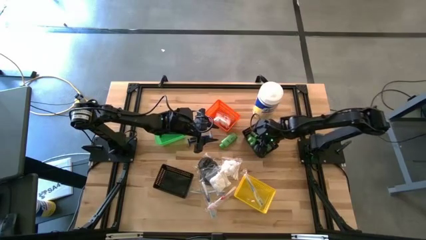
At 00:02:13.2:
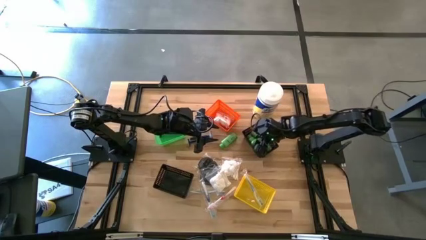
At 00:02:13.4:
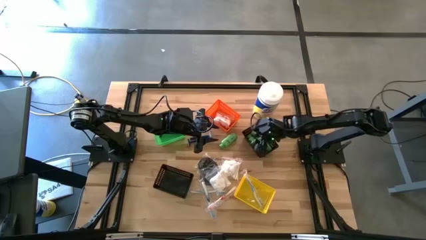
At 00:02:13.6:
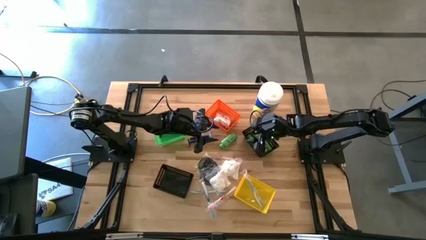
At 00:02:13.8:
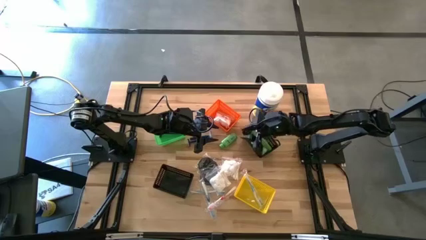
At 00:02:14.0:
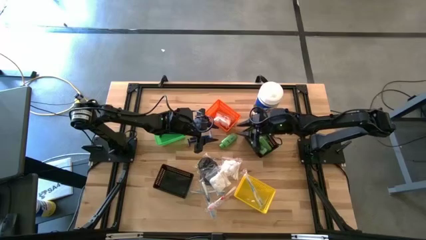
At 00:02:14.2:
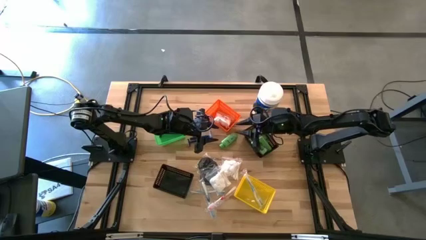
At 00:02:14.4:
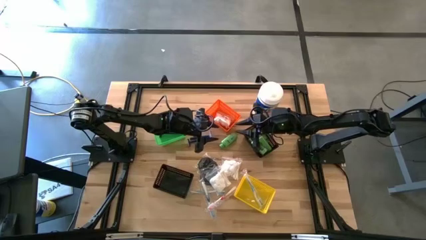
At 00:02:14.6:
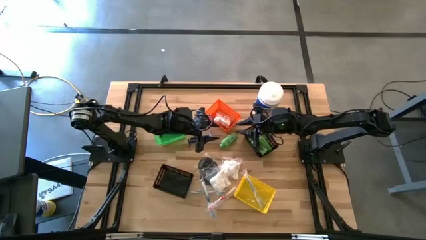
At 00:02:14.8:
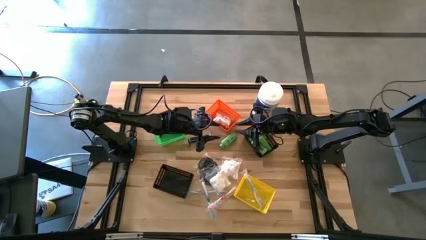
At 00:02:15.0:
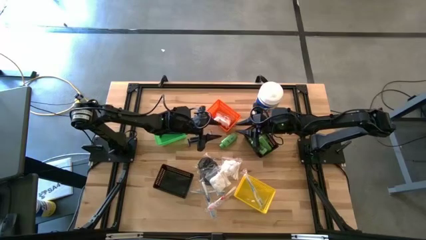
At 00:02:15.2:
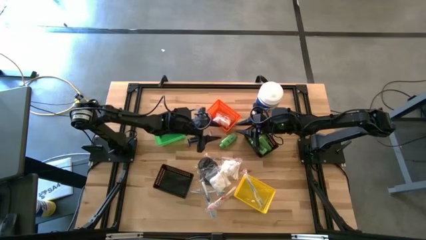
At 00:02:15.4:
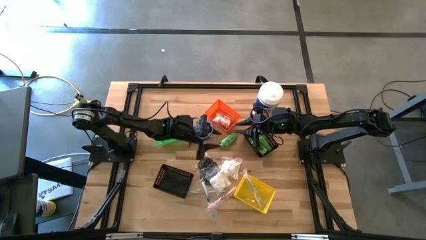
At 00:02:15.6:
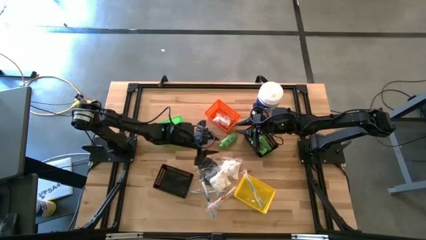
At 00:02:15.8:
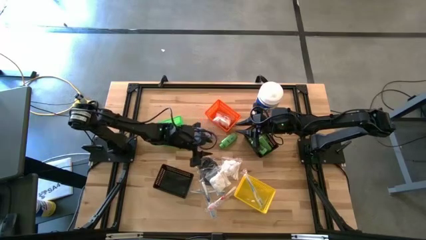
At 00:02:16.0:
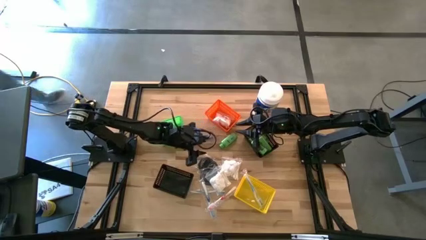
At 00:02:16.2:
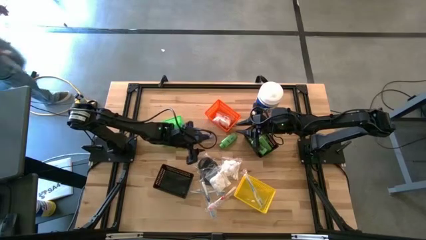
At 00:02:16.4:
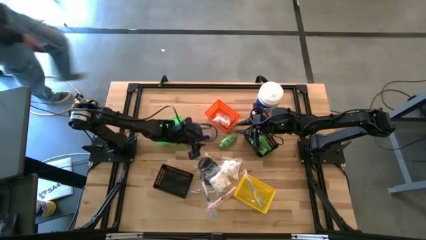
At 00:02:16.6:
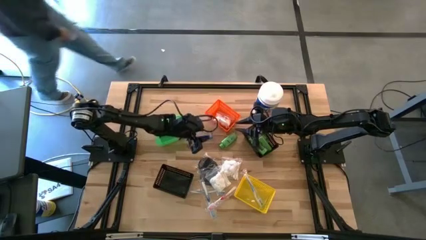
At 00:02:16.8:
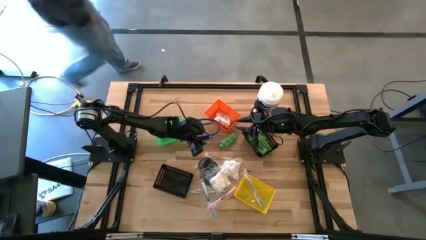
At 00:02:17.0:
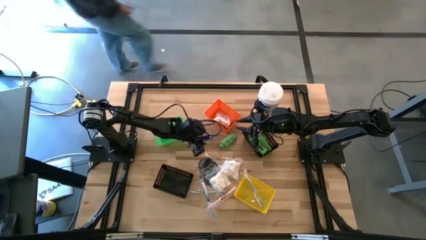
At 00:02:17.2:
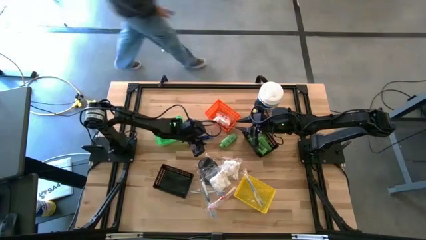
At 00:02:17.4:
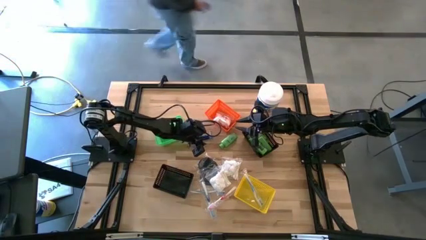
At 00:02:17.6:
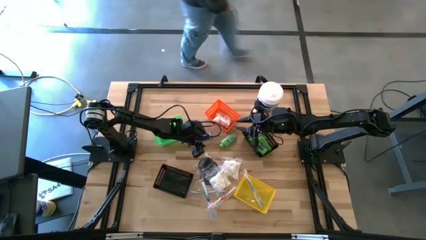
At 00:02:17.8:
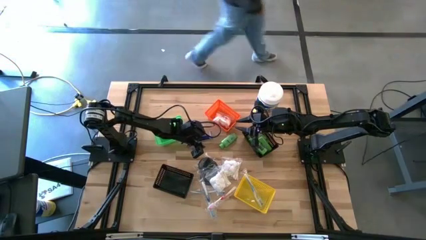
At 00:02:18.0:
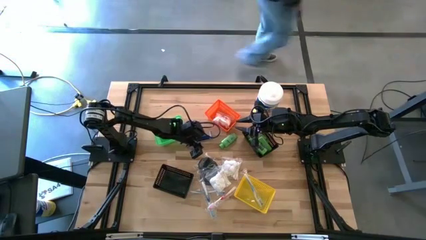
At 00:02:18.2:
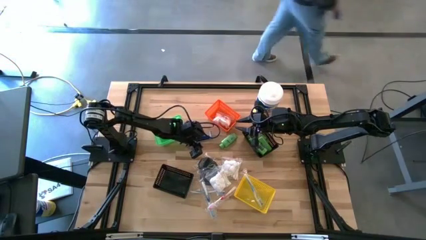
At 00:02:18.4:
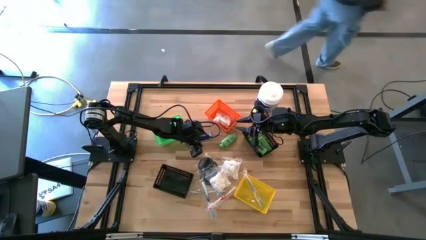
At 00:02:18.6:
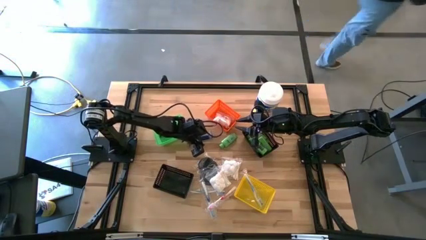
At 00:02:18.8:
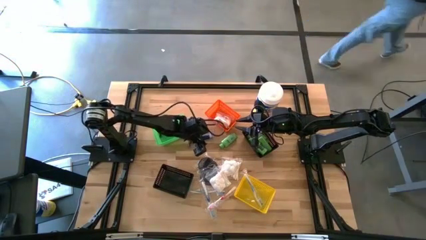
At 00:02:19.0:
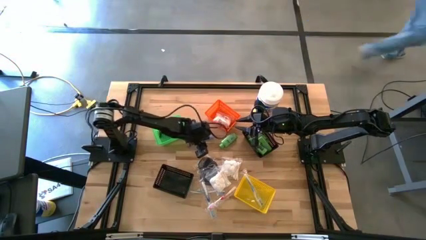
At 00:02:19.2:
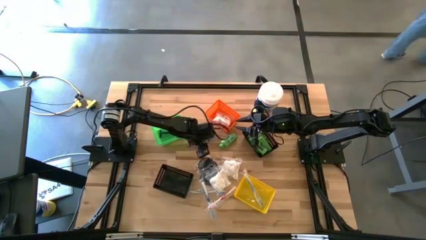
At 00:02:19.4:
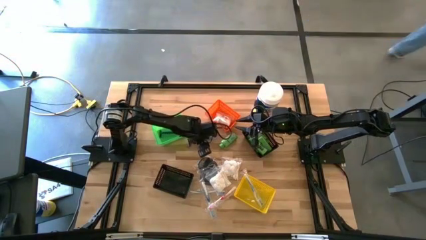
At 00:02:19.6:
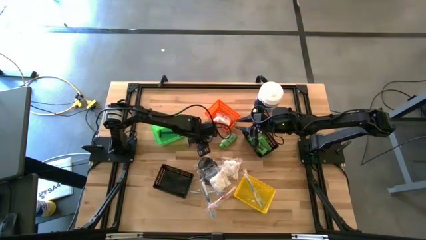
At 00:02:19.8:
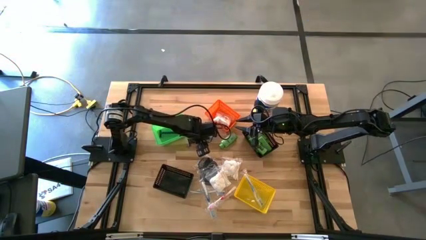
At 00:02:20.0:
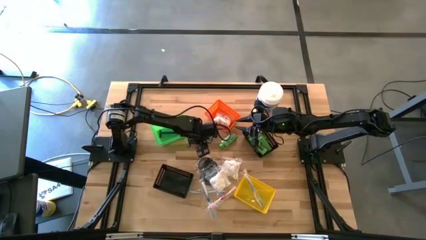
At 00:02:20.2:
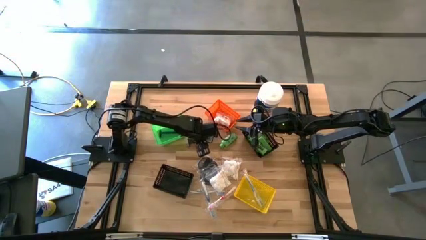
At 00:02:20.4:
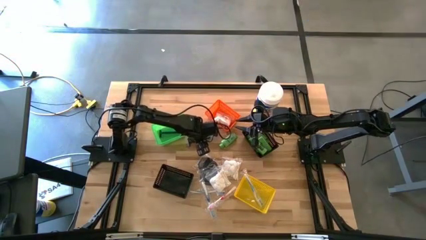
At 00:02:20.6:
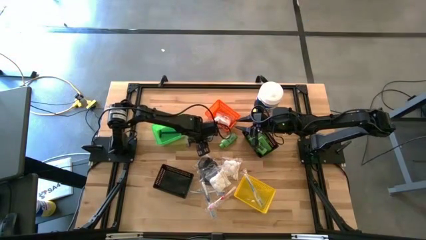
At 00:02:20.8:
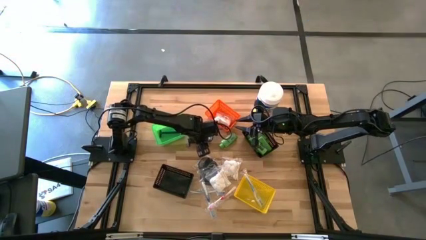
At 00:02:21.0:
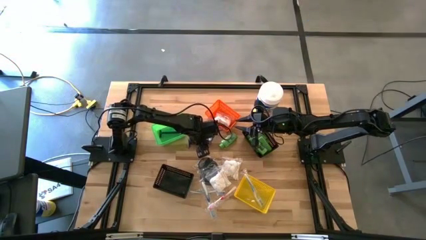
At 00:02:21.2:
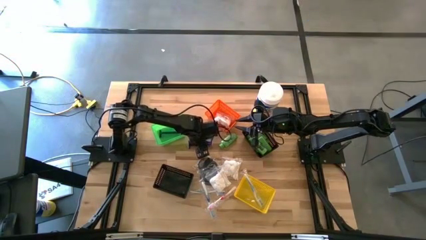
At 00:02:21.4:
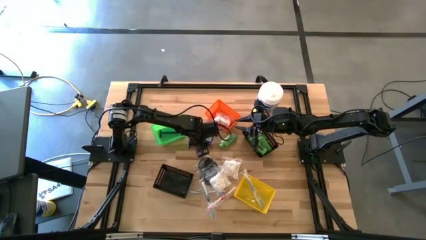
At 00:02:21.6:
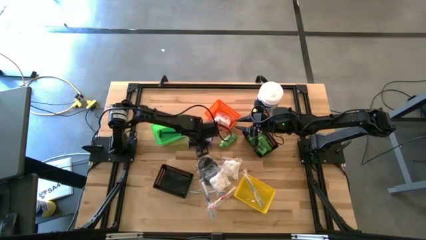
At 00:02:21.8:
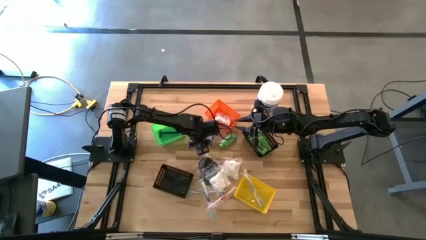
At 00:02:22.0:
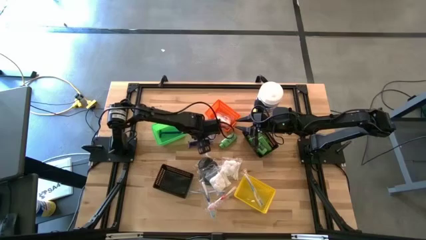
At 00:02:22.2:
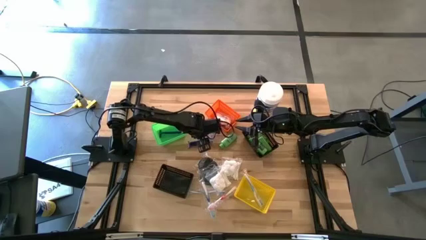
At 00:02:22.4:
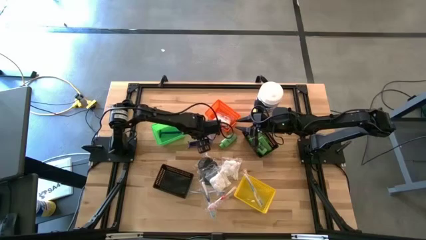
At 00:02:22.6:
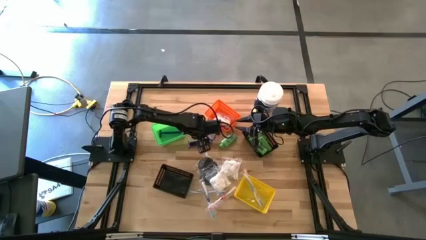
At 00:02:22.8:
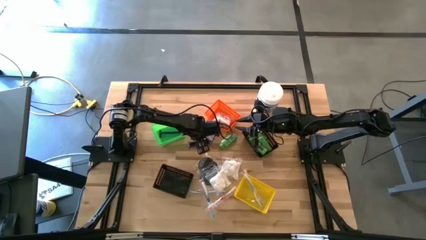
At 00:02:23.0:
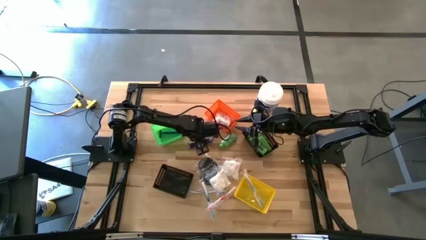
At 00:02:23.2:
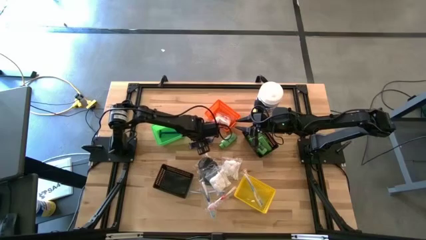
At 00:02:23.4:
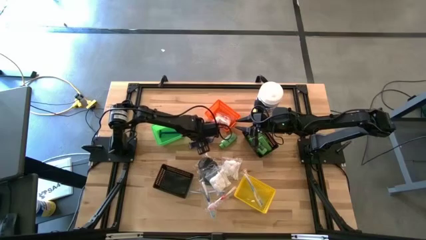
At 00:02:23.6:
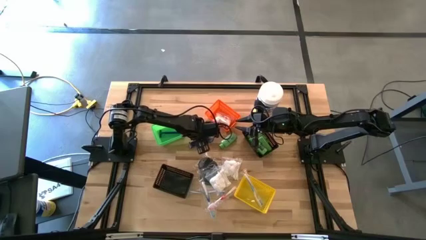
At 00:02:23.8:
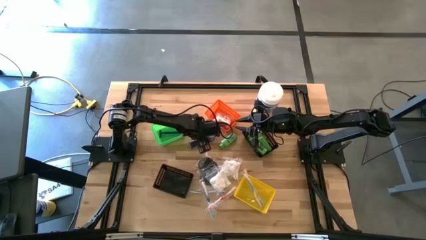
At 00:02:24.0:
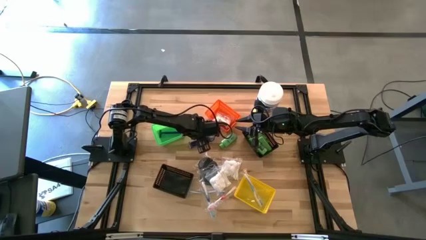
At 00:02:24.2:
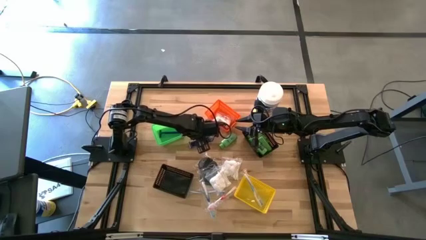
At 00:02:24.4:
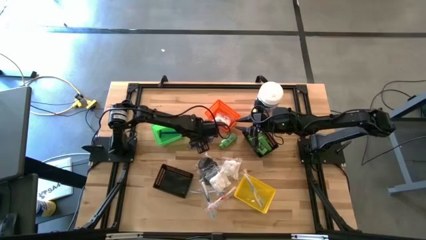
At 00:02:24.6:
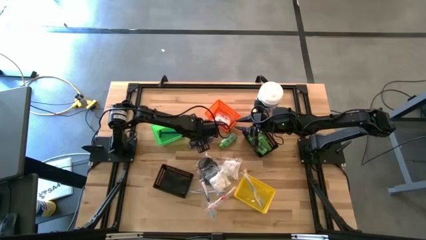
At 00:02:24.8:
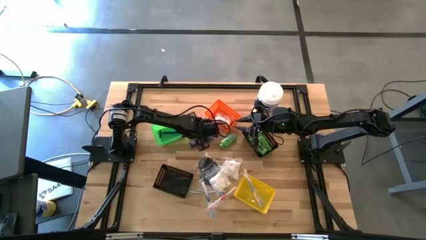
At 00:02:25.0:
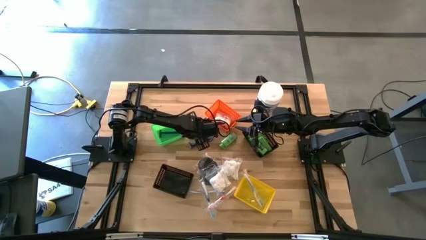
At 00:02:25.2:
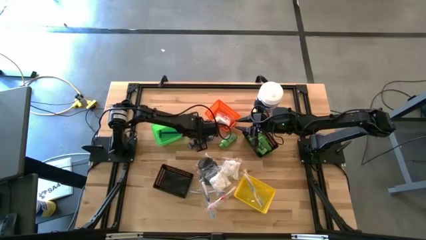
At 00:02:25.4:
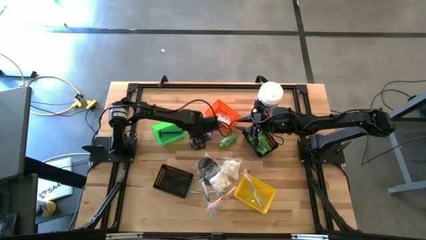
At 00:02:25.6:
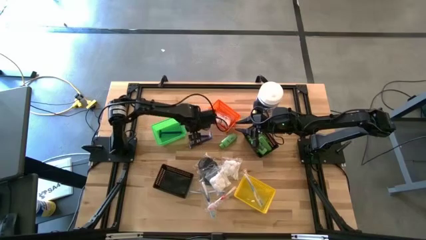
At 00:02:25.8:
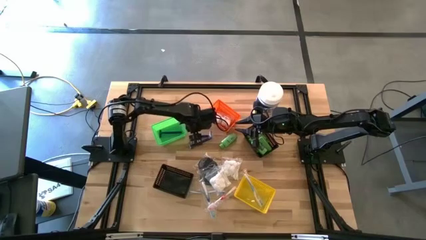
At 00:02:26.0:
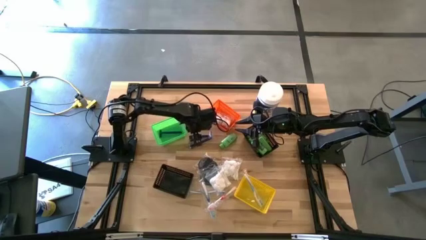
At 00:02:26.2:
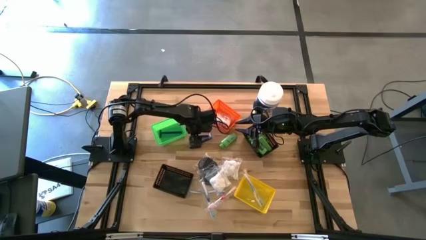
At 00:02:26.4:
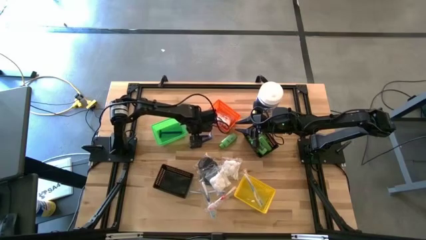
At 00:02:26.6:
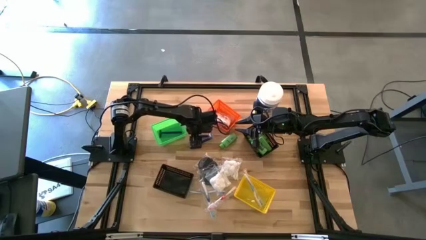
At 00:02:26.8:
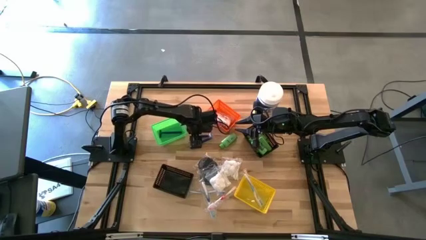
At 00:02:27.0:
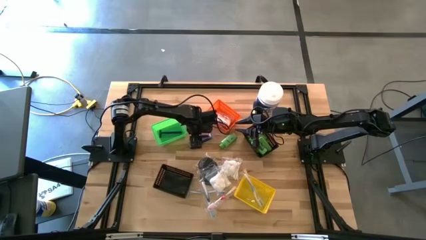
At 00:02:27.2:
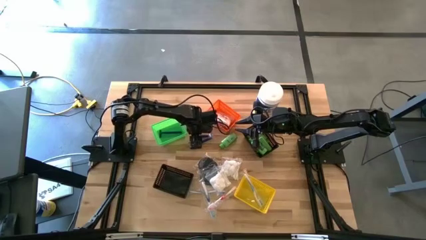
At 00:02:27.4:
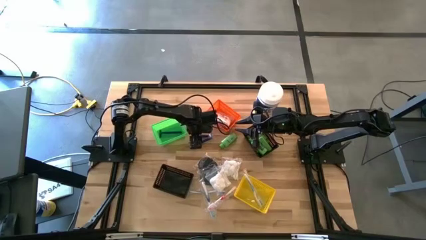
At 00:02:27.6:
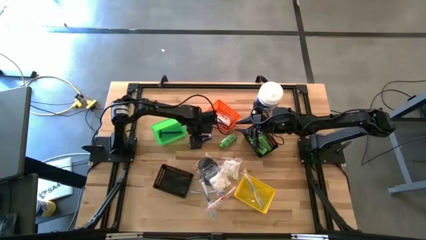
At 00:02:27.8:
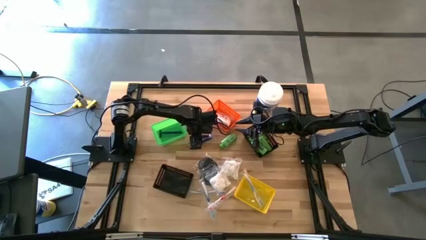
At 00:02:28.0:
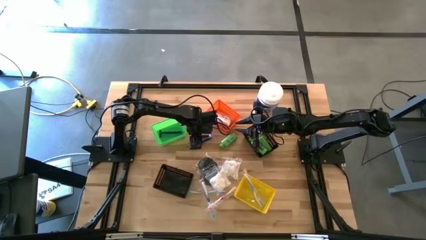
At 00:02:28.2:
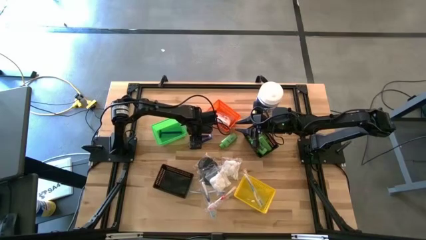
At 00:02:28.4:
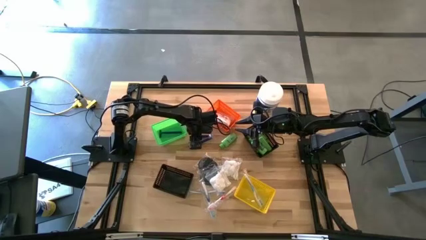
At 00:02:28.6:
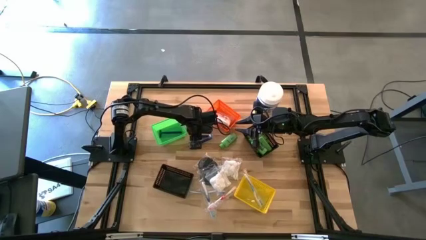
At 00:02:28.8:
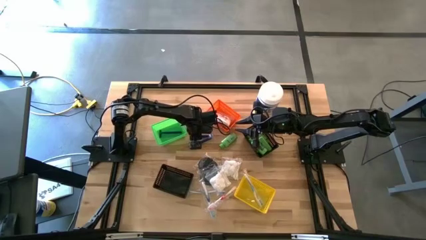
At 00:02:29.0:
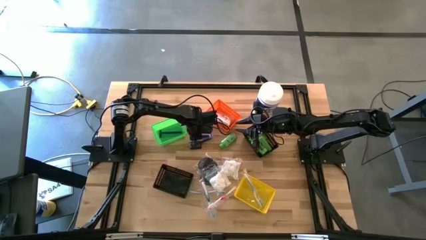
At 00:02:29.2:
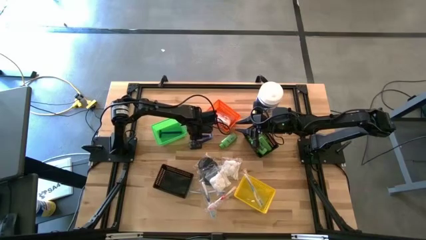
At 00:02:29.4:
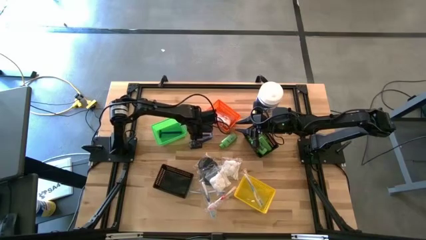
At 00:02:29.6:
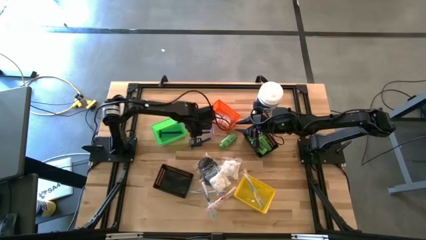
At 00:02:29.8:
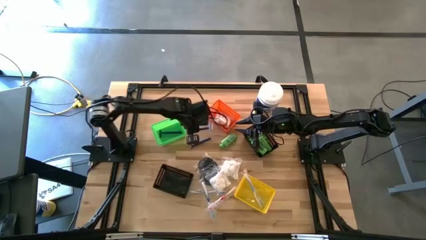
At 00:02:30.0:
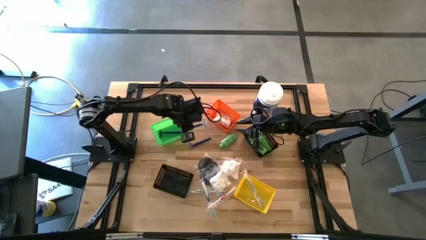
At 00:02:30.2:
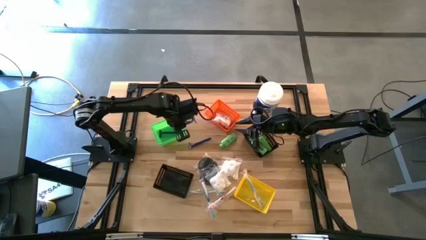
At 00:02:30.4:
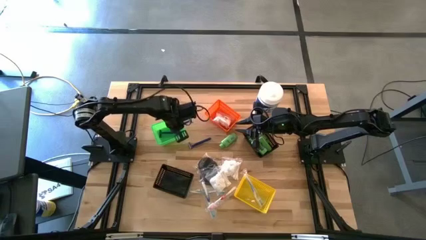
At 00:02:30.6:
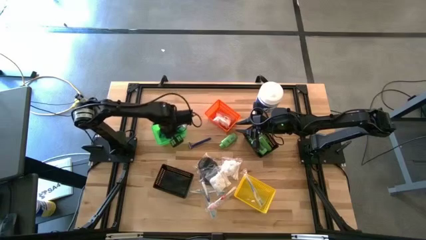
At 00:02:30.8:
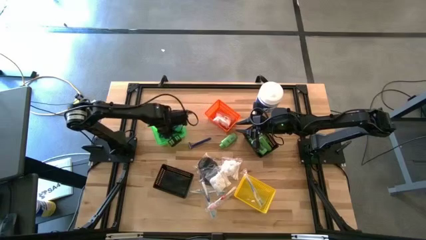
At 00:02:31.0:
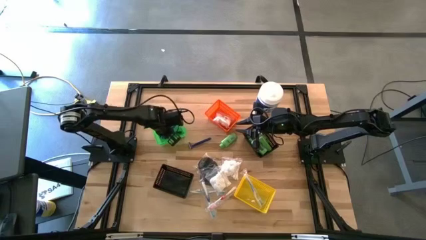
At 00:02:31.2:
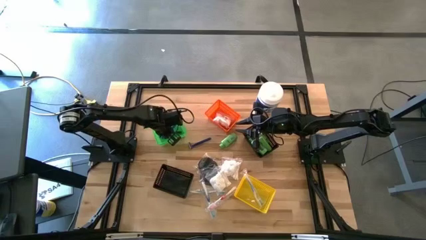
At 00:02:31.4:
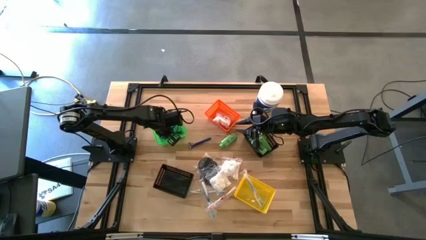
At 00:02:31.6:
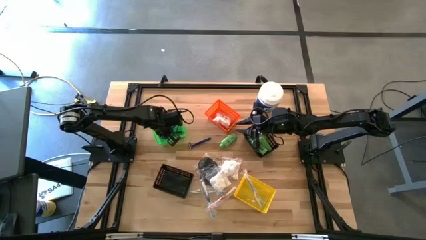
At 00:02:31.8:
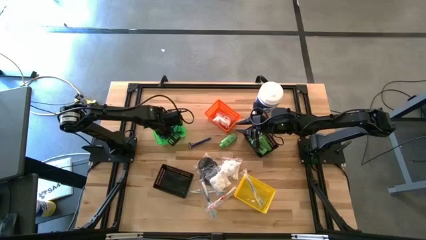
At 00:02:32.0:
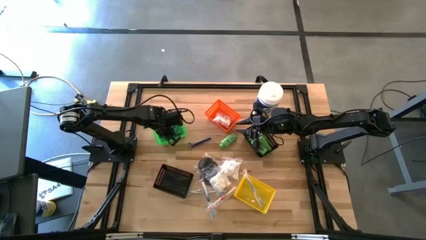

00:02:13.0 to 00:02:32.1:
Task: Pick & Place Travel size toiletries
Put the blue razor into the green bin
